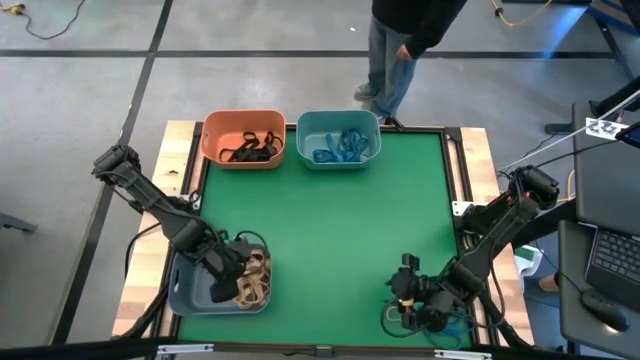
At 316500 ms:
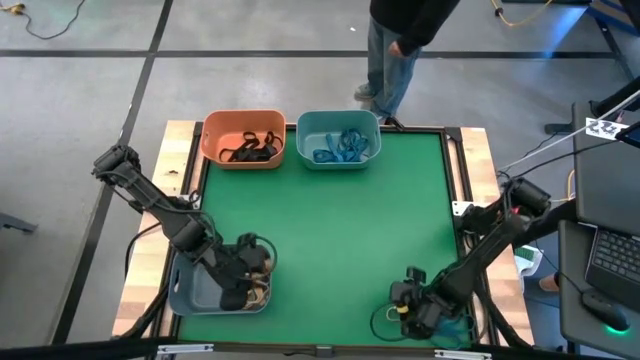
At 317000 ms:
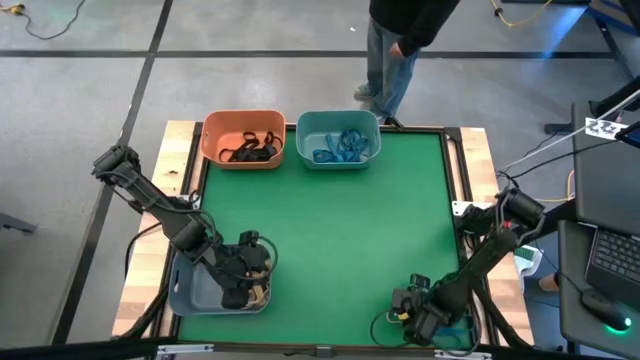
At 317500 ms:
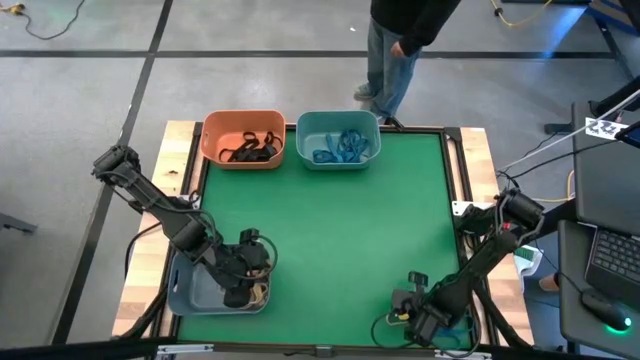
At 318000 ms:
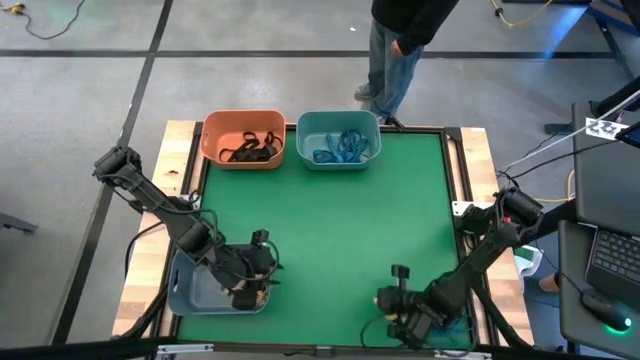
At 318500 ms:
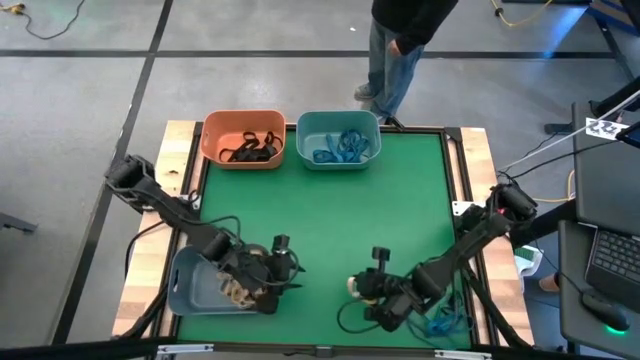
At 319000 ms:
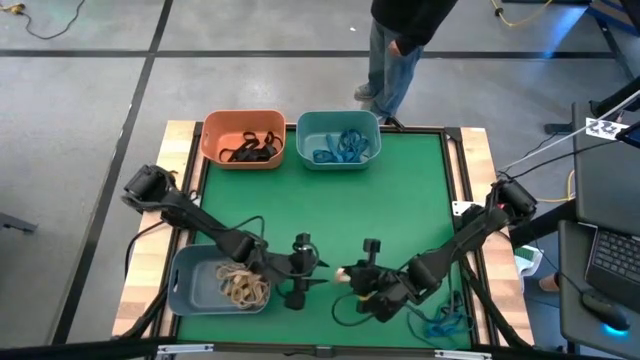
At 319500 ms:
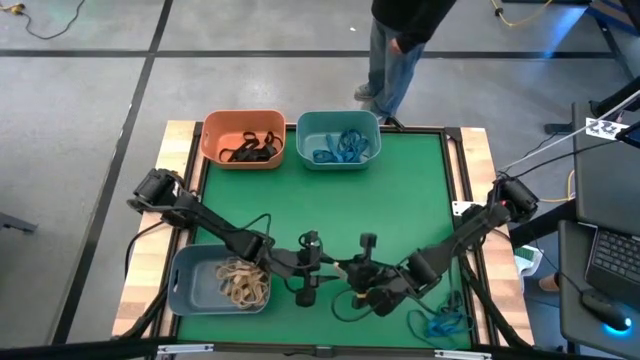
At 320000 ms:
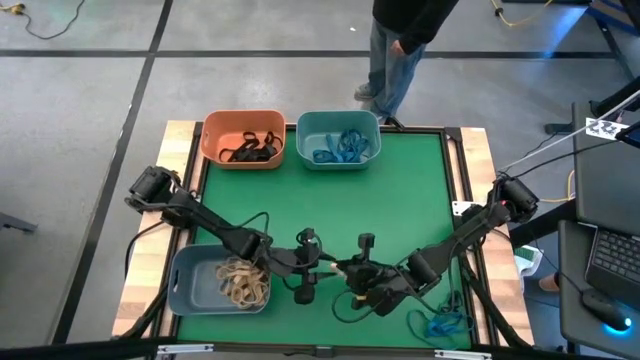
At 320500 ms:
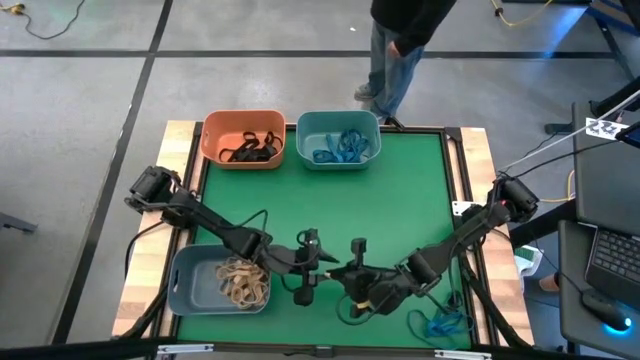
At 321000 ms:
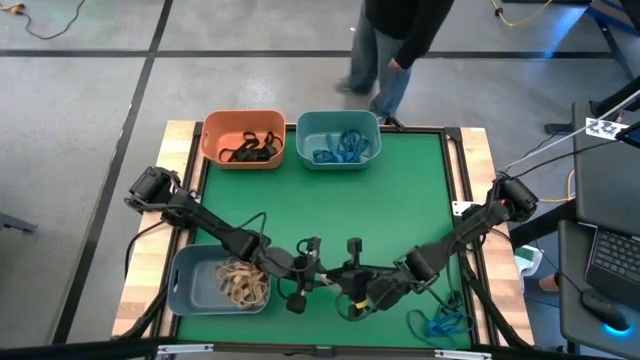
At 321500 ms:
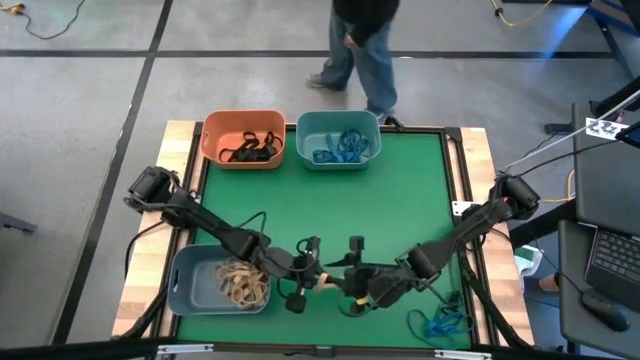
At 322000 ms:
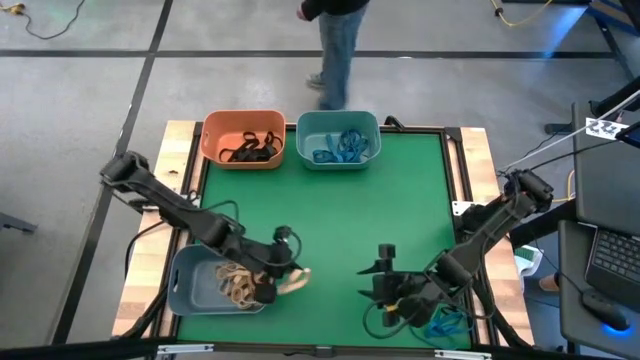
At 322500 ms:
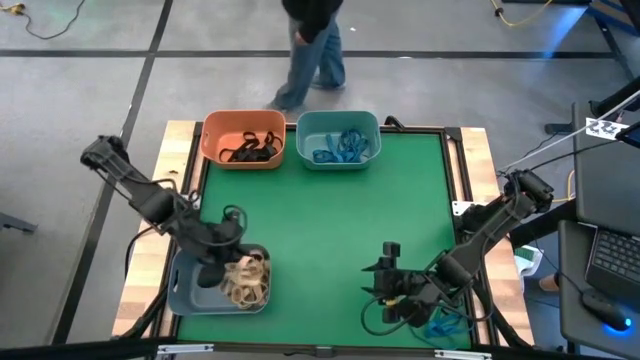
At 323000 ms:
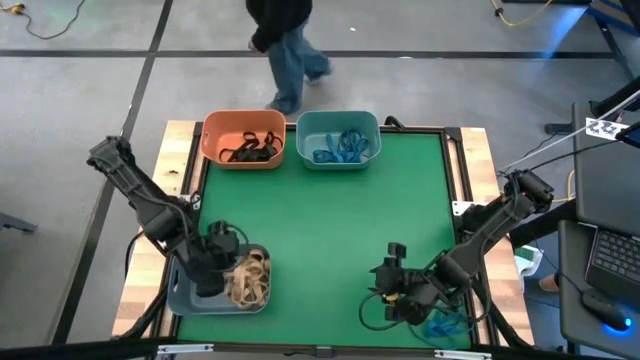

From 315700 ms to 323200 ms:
Task: Sort rubber bands into baskets
Put the white rubber band into the blue bin

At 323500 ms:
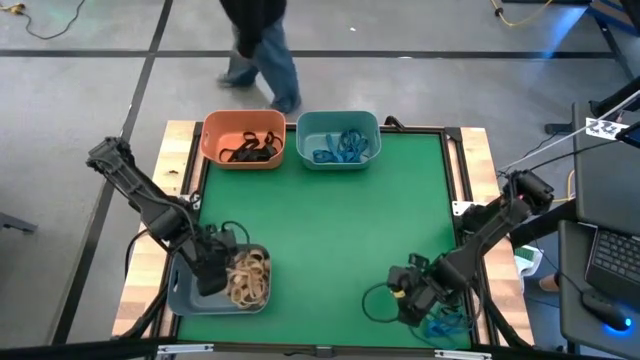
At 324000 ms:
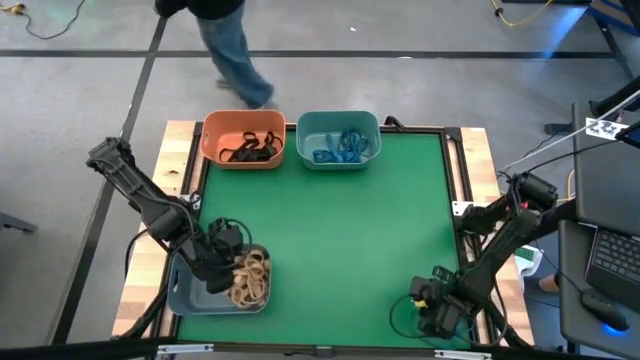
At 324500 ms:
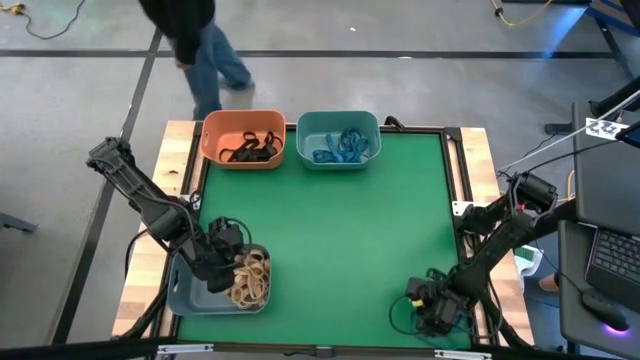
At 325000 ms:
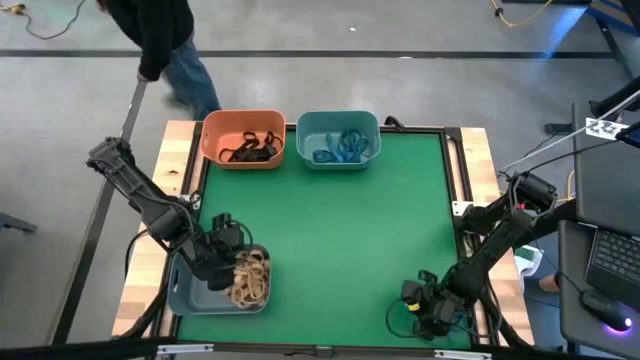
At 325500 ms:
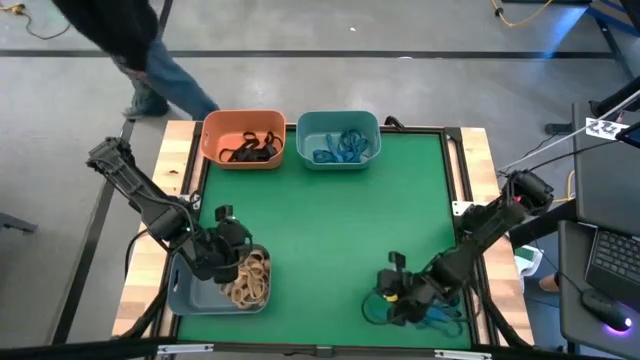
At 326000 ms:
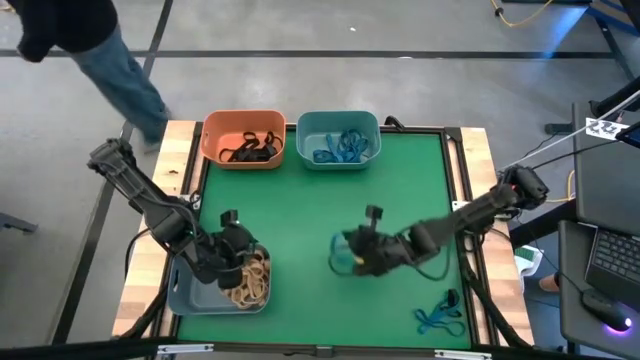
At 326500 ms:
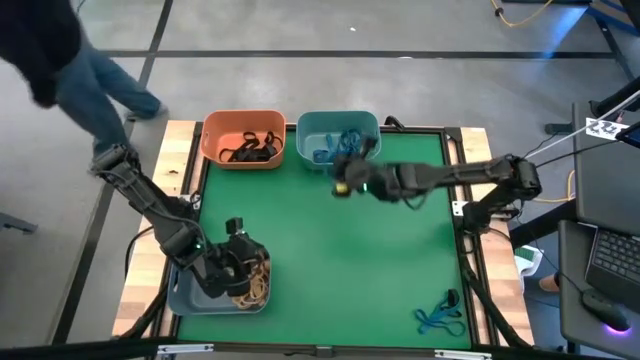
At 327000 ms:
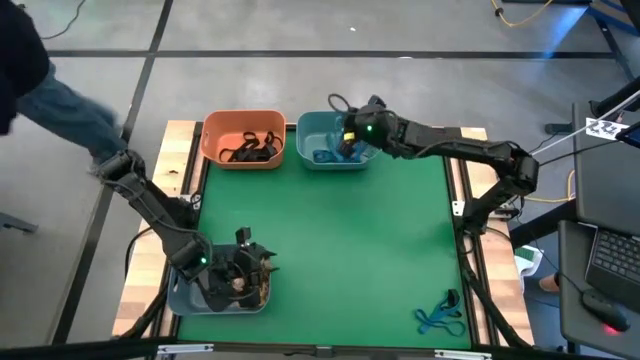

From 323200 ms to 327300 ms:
Put the blue rubber band into the green bin

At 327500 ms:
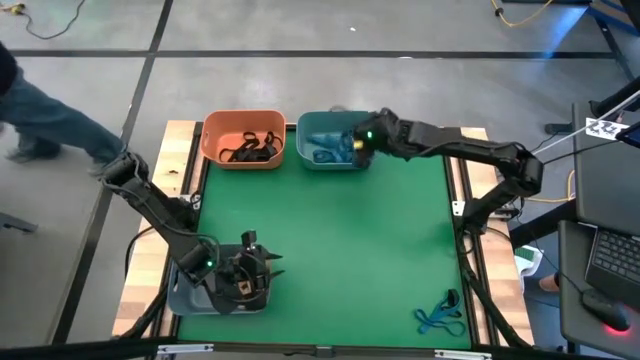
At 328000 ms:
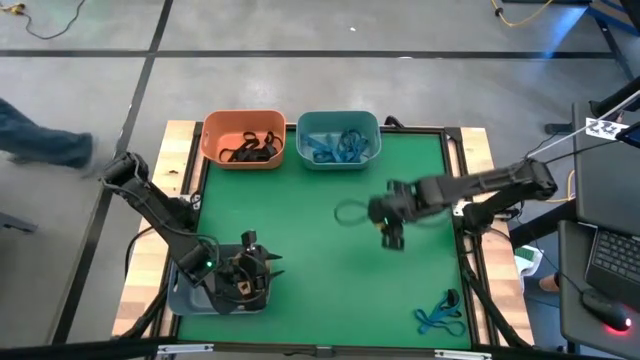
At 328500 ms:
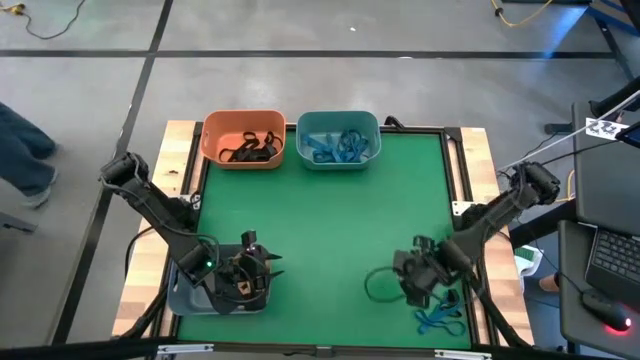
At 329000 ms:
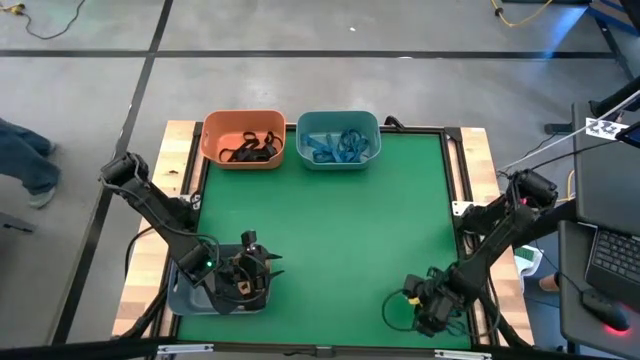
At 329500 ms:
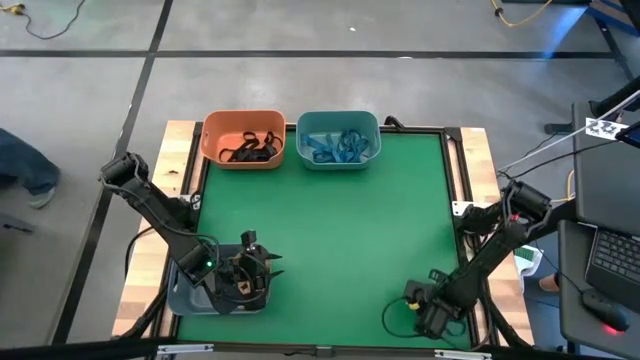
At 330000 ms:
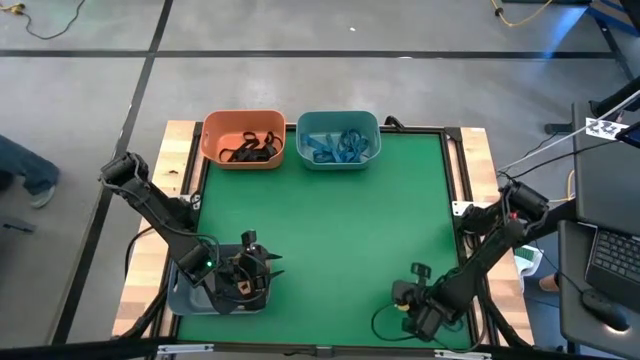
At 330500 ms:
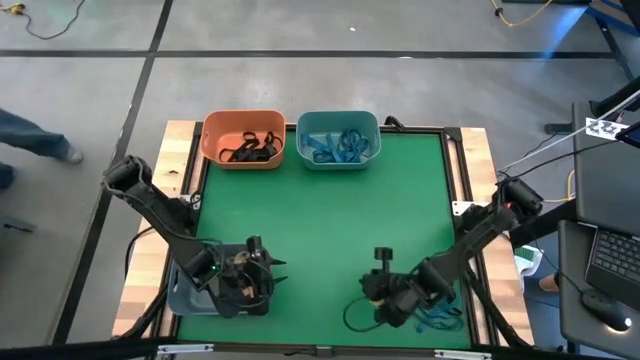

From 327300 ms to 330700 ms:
Put the blue rubber band into the green bin

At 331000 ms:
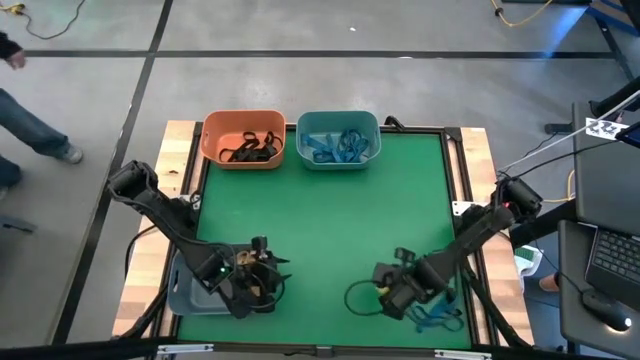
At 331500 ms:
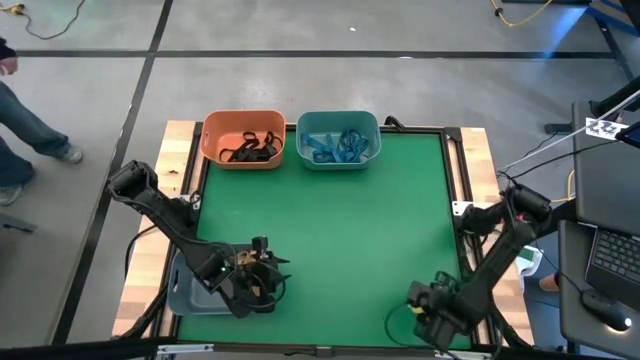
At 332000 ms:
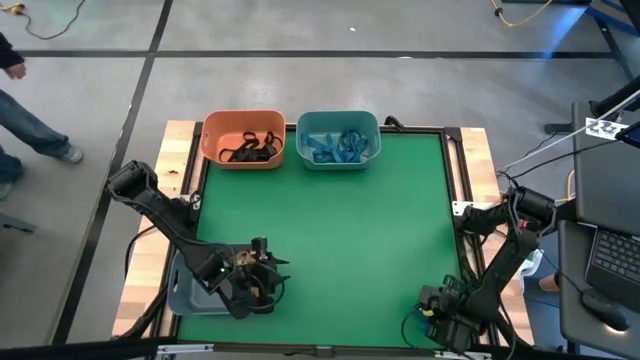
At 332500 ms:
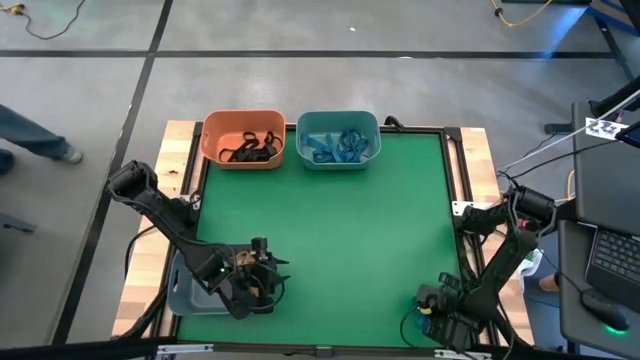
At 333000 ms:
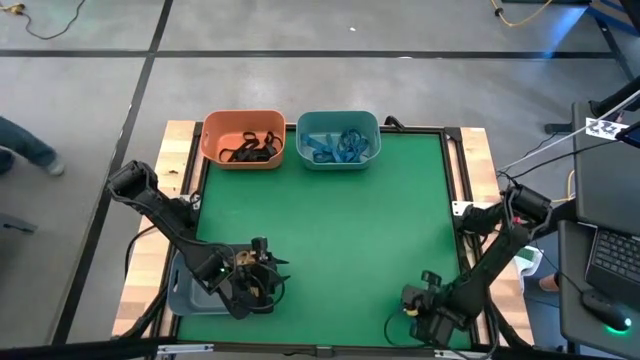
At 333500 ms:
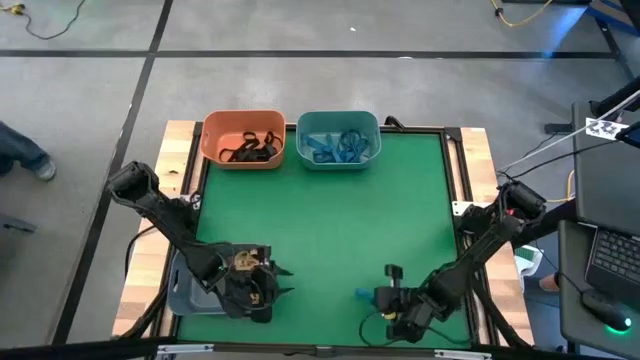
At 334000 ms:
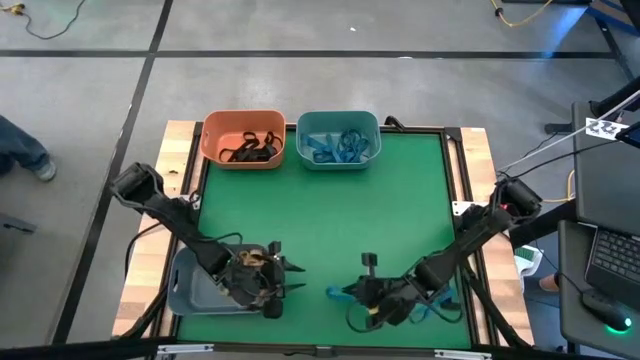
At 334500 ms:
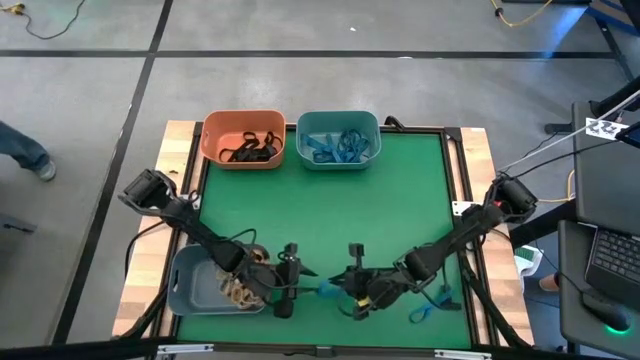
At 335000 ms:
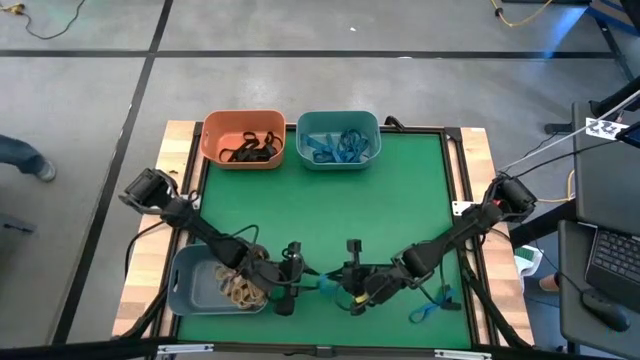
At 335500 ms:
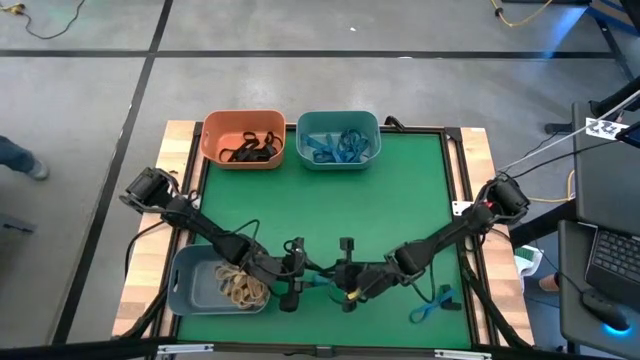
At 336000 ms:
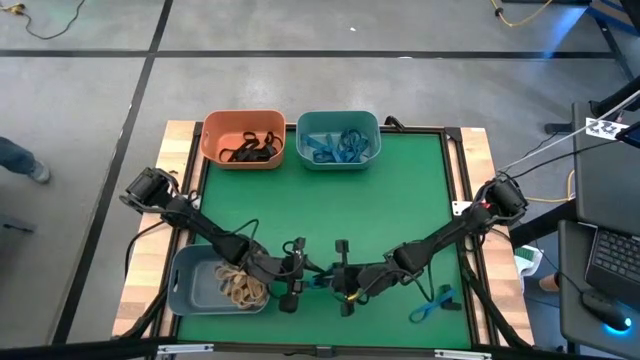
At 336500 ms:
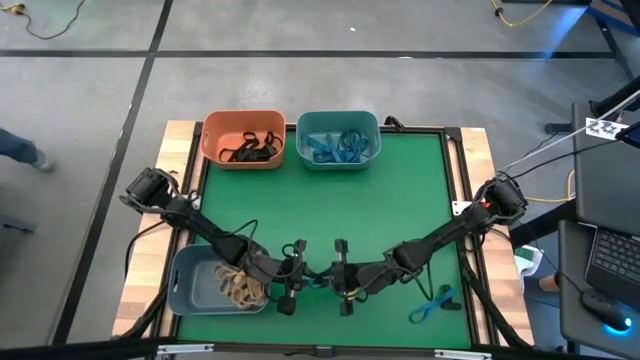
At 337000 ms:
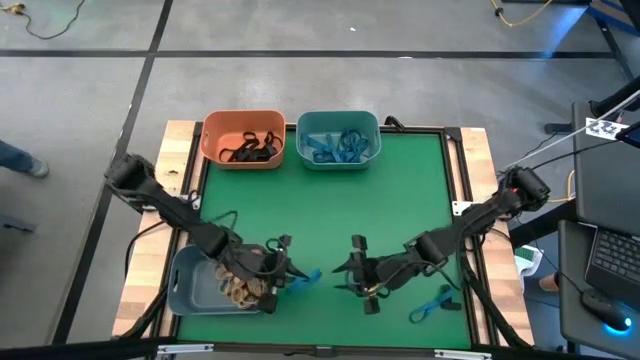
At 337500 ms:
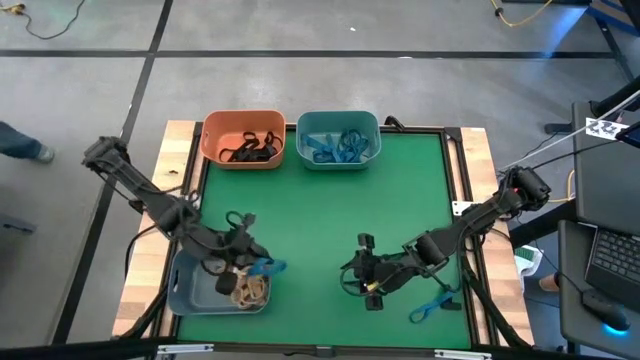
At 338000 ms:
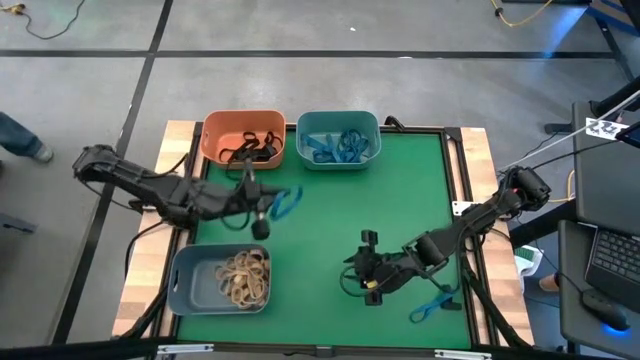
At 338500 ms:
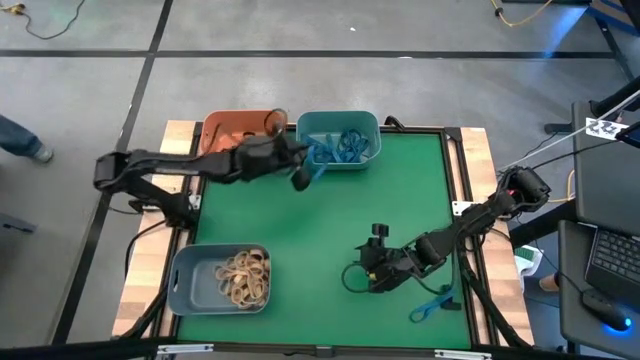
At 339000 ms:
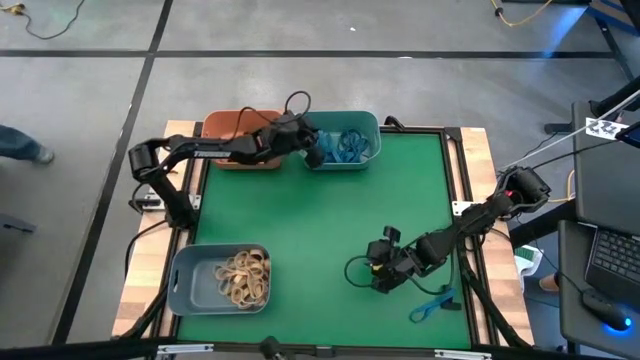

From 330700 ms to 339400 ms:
Put the blue rubber band into the green bin
